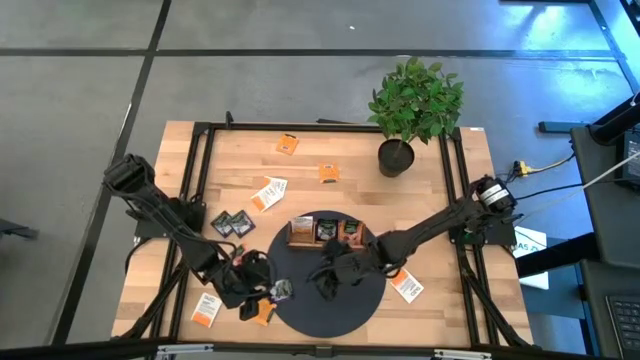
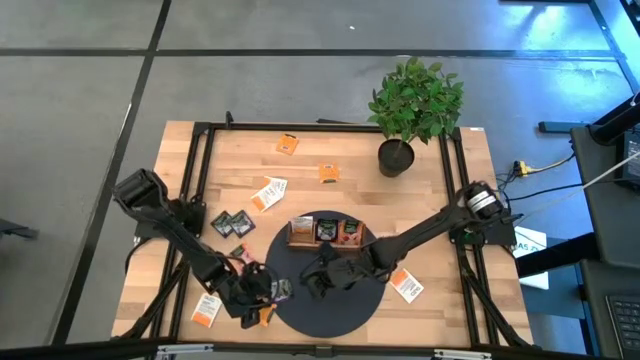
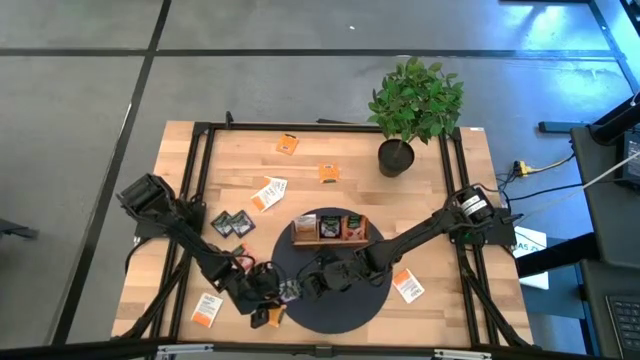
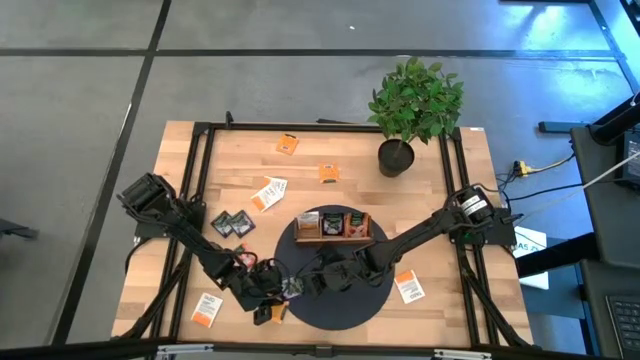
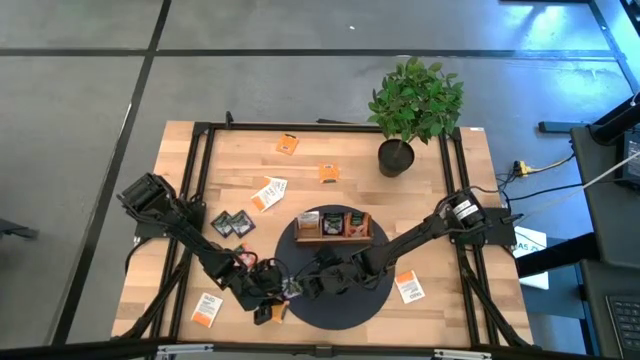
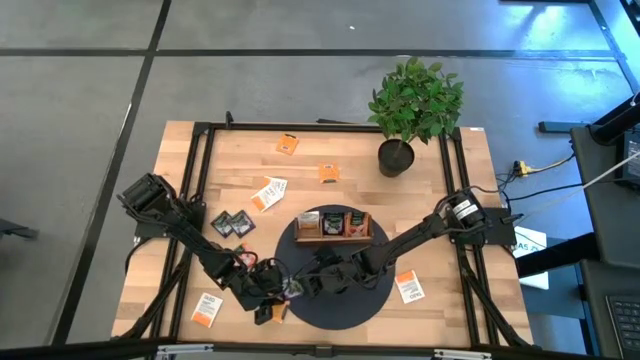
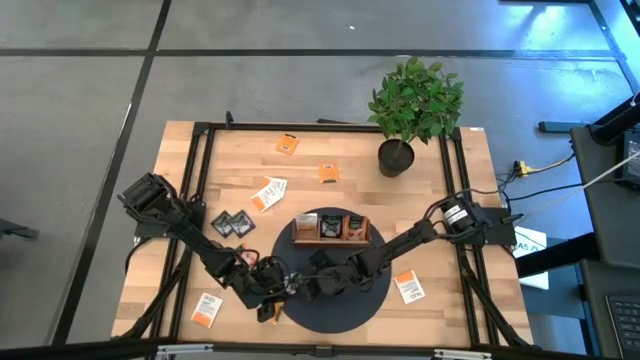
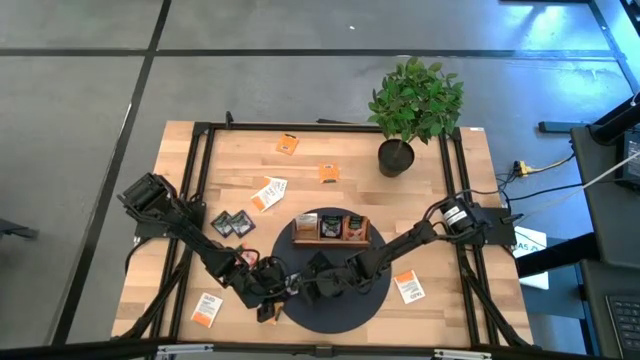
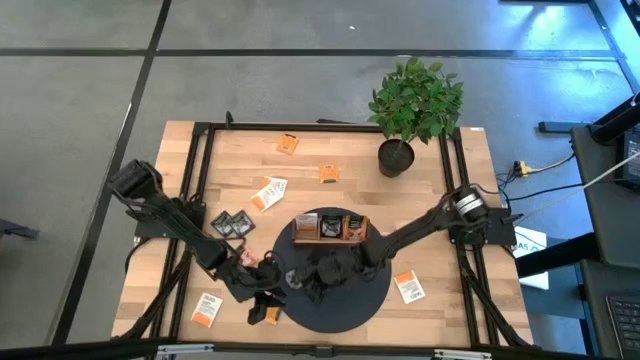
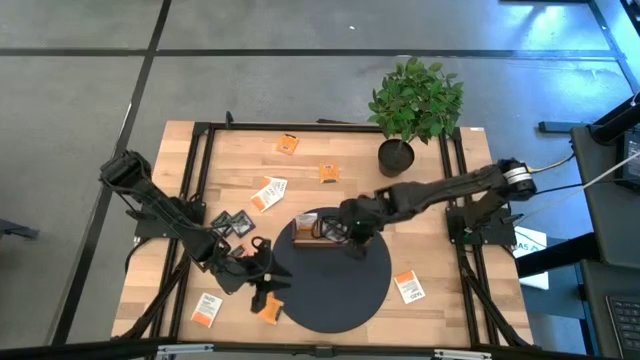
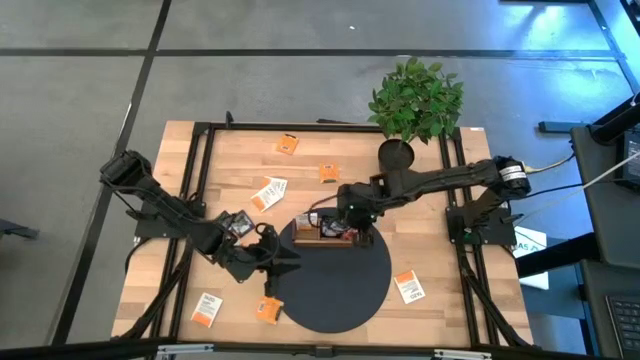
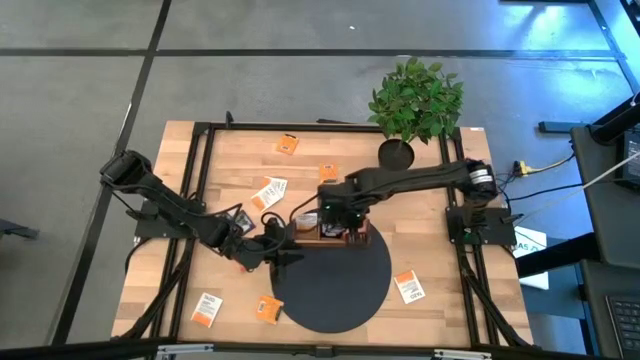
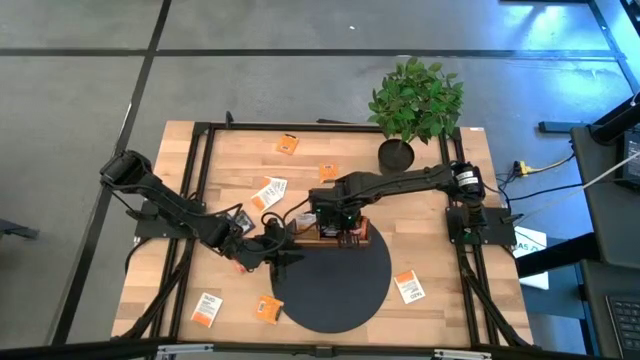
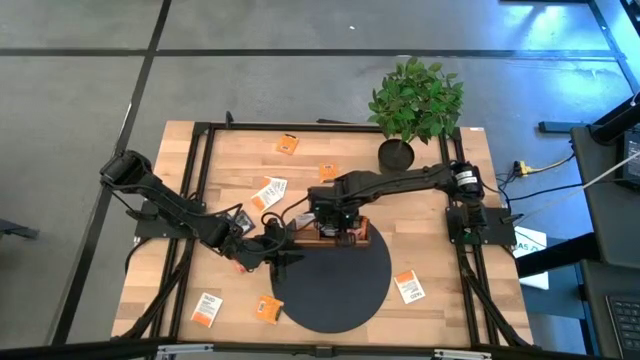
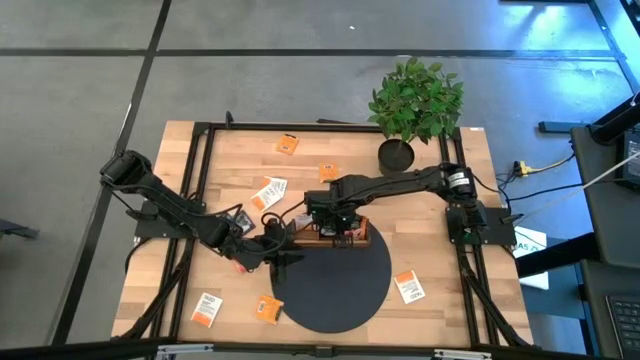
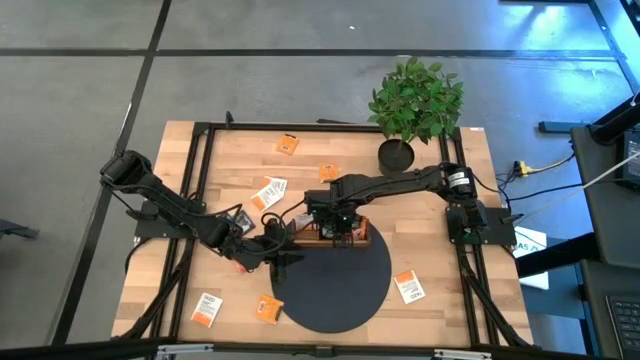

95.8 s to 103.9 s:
Task: Pick & Place Tea
Put the black tea bag into the middle section of the wooden organizer

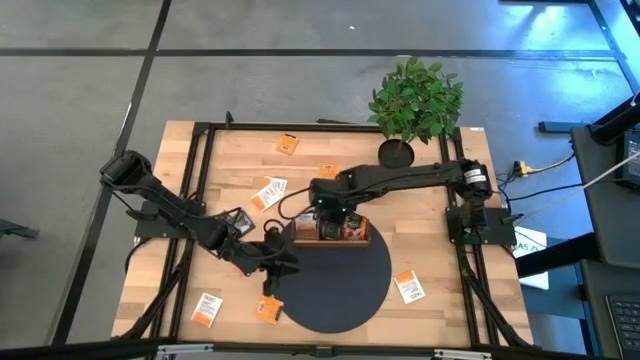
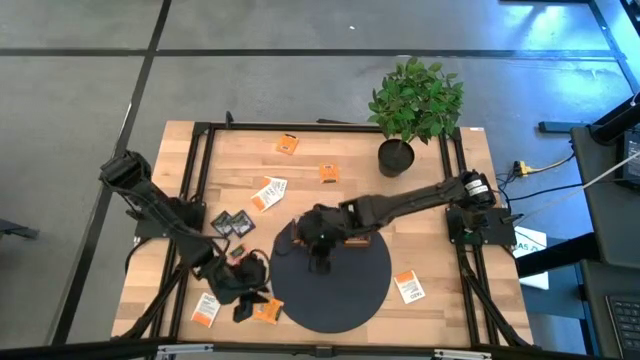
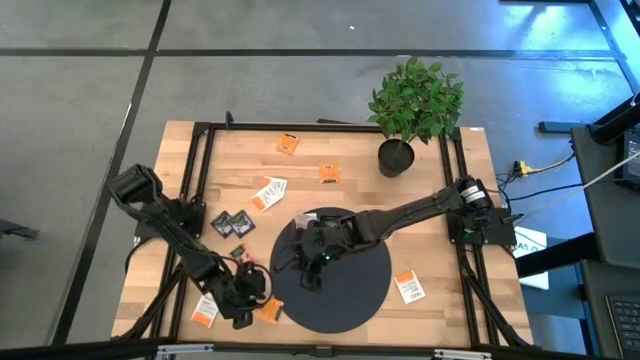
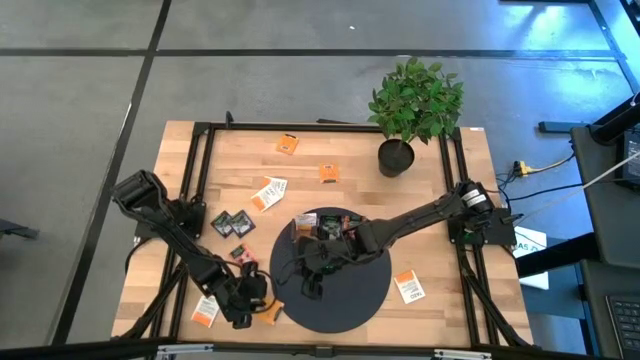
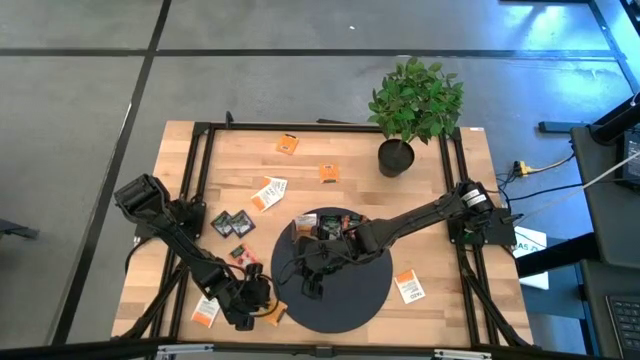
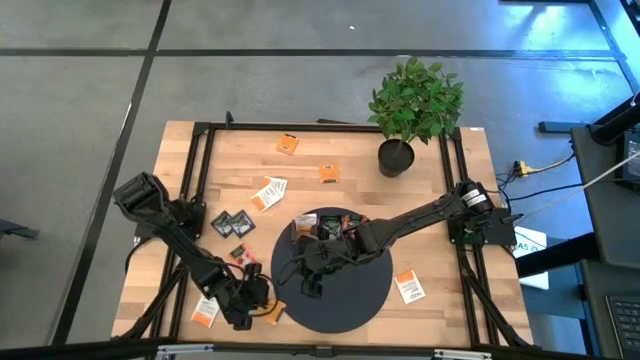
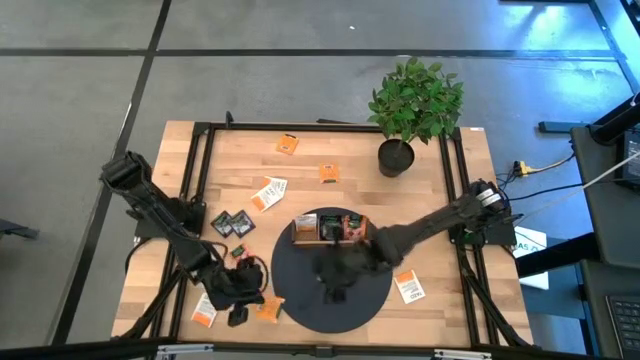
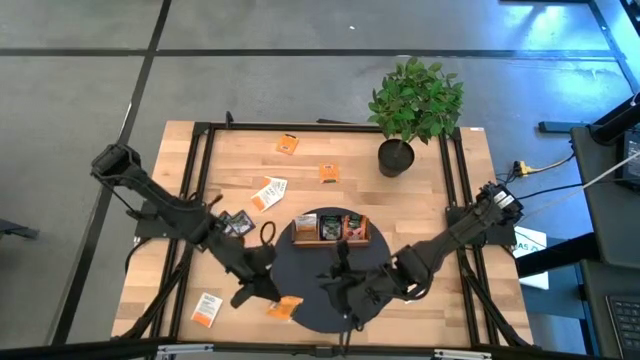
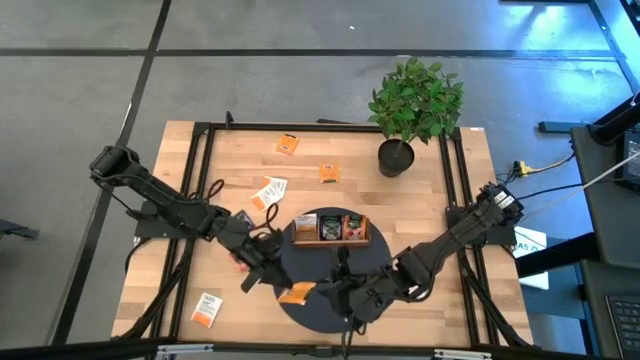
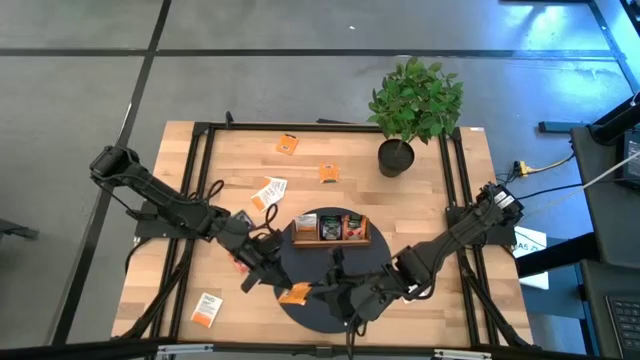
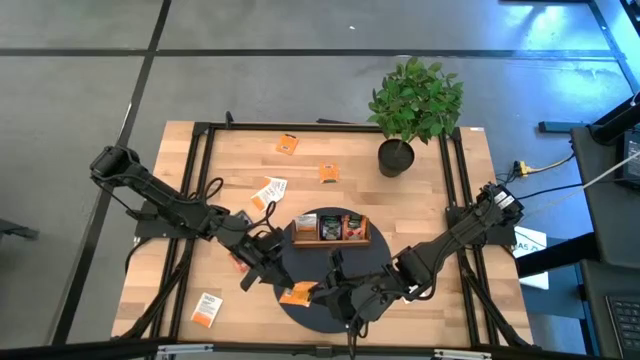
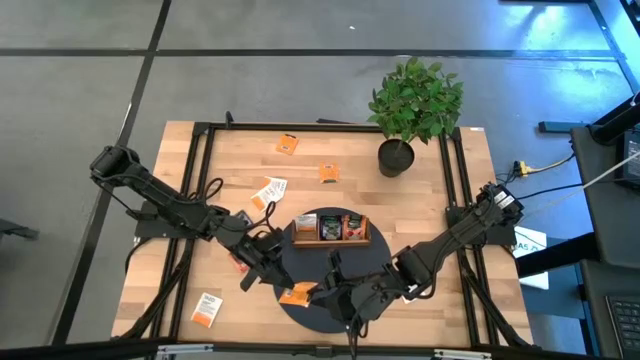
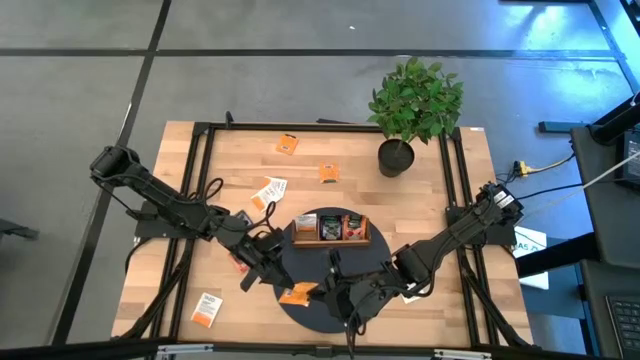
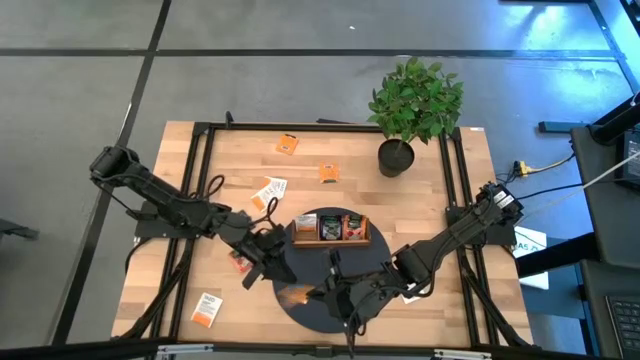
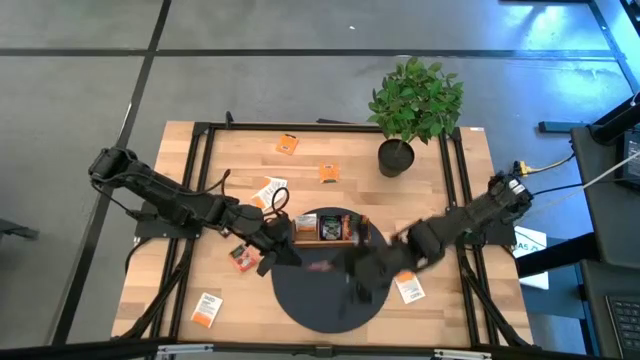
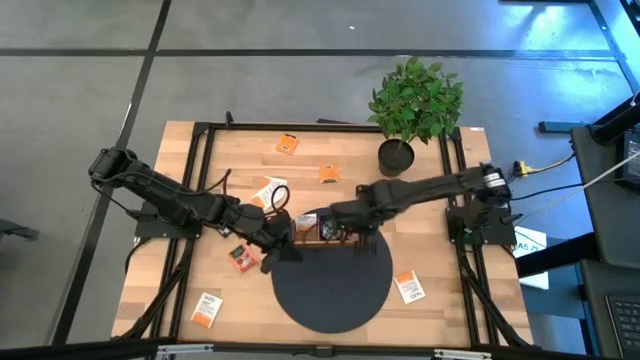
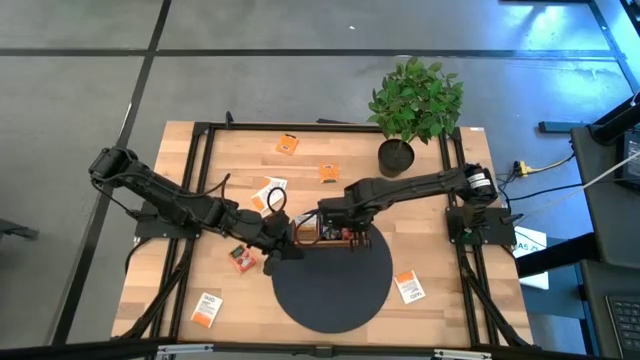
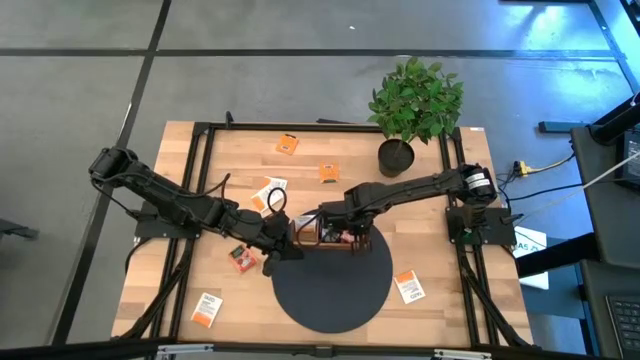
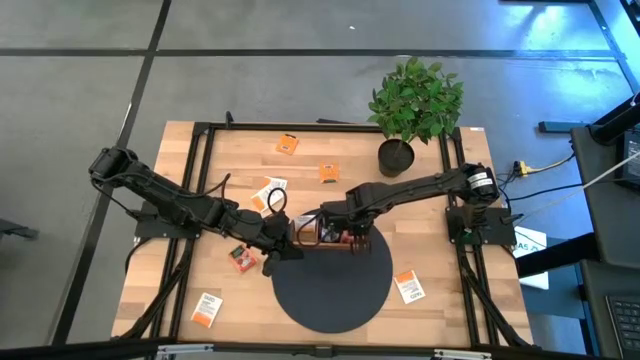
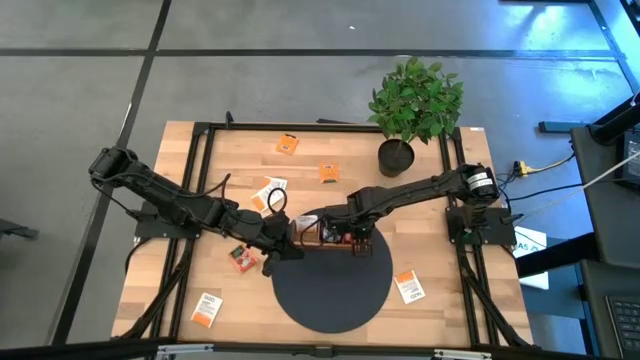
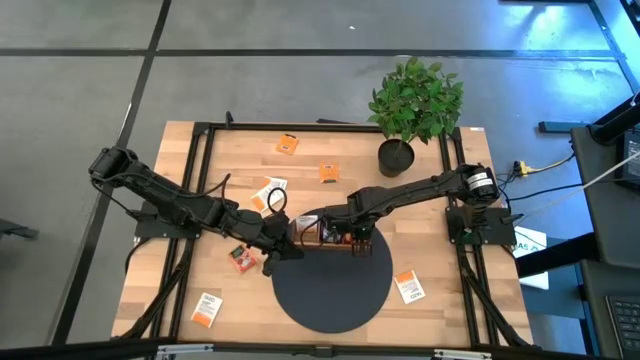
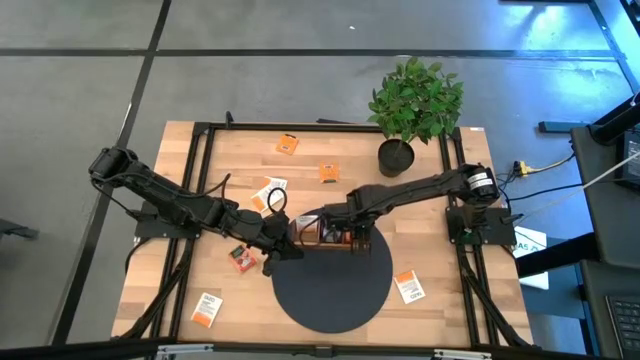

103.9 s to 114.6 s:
Put the orange tea bag into the right section of the wooden organizer

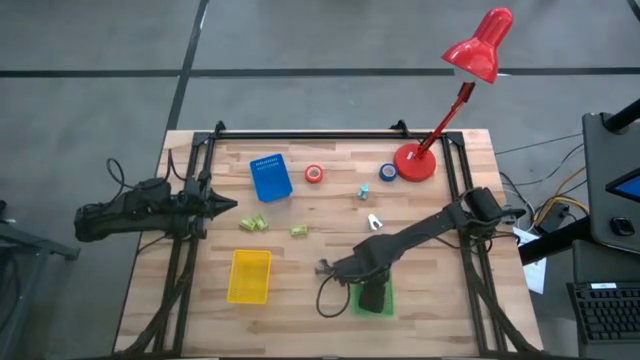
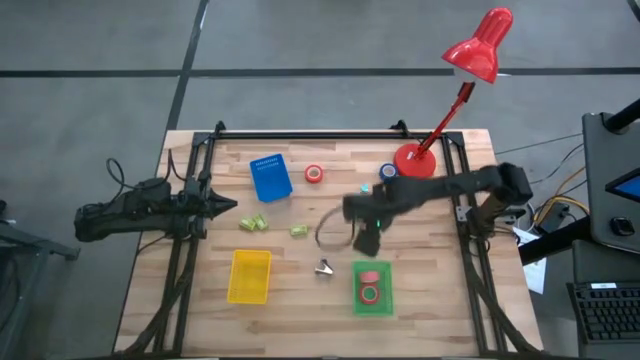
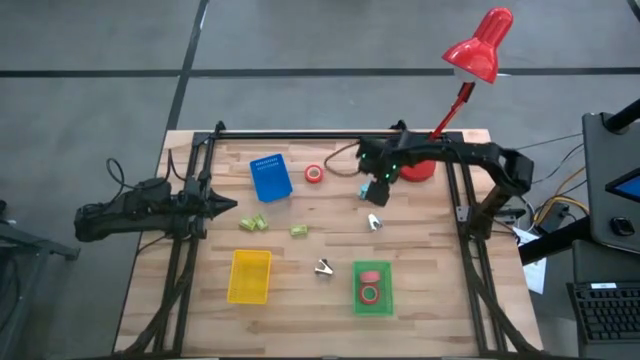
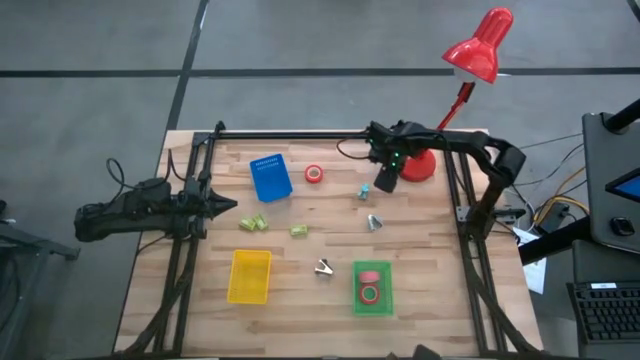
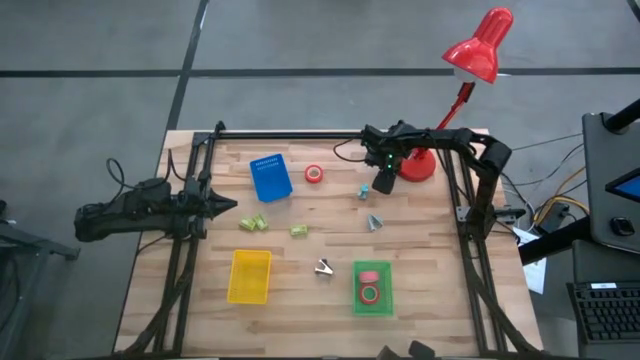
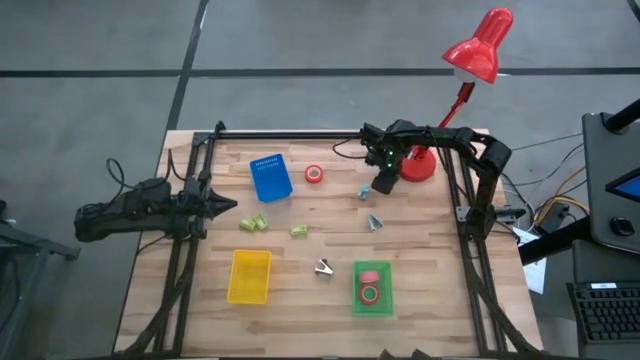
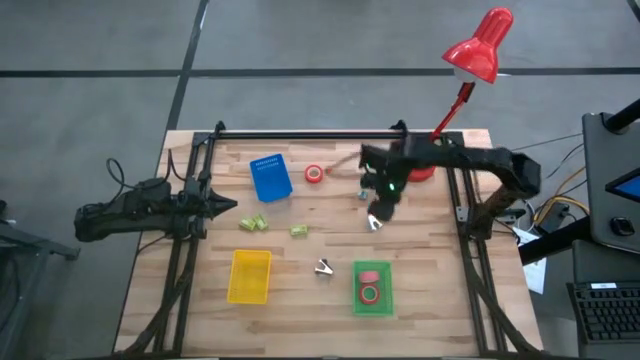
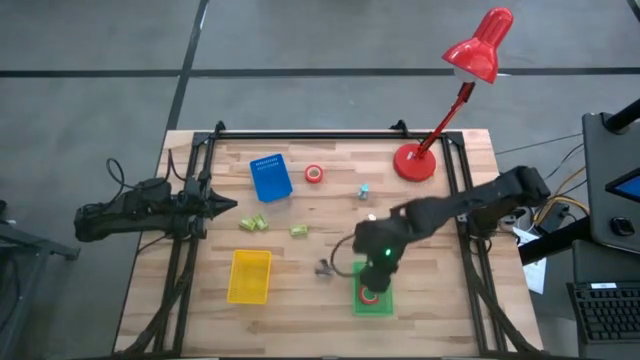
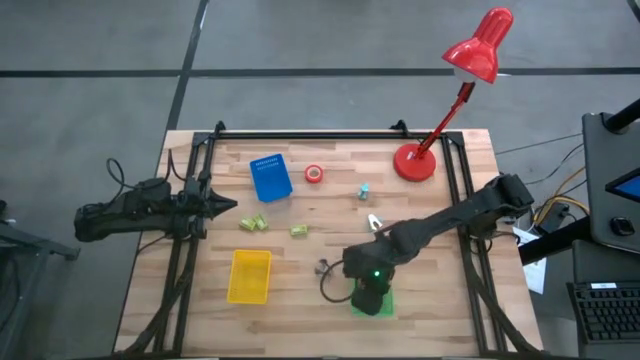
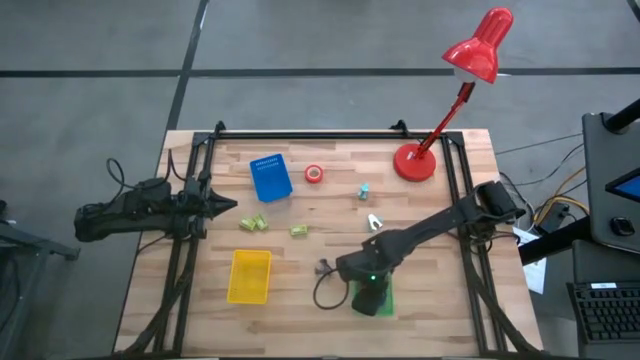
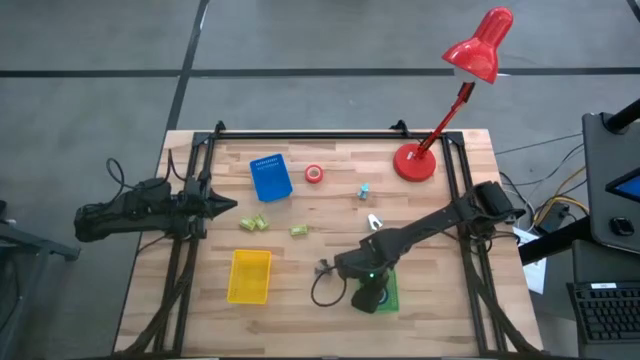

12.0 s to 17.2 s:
Task: Pick and place Stapler, Stapler remover, tape
Put the blue electrical tape into the green bin
